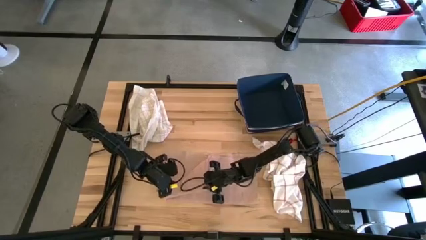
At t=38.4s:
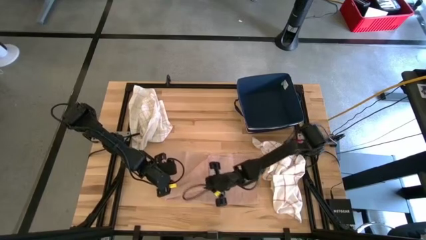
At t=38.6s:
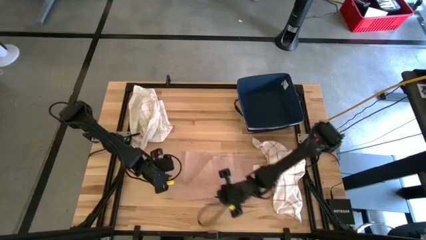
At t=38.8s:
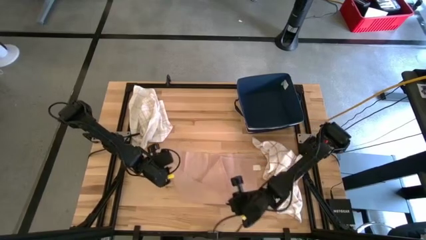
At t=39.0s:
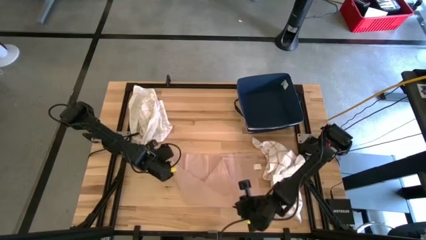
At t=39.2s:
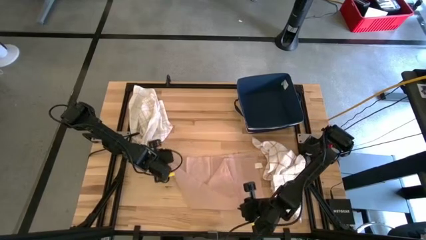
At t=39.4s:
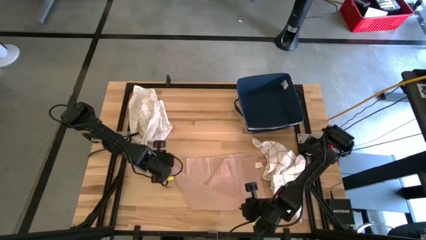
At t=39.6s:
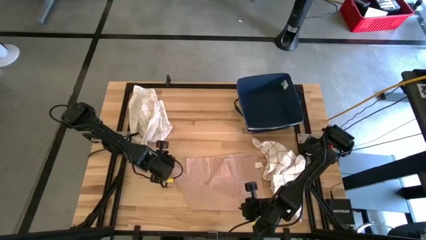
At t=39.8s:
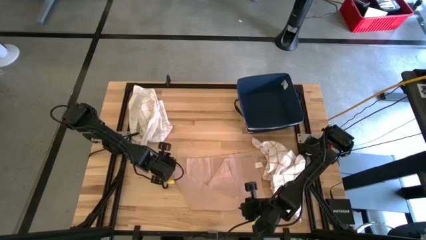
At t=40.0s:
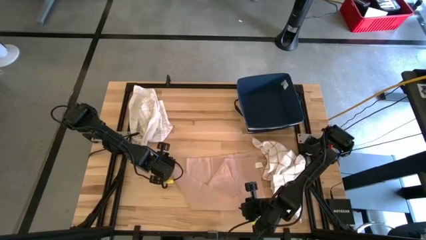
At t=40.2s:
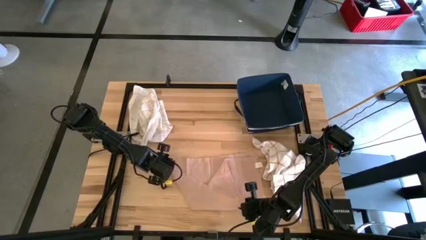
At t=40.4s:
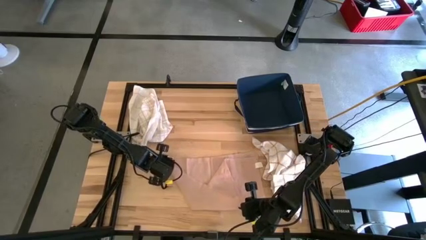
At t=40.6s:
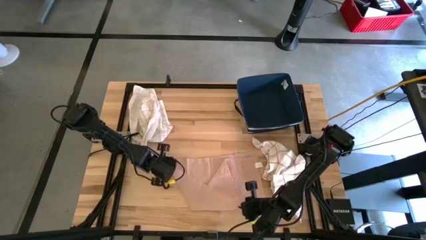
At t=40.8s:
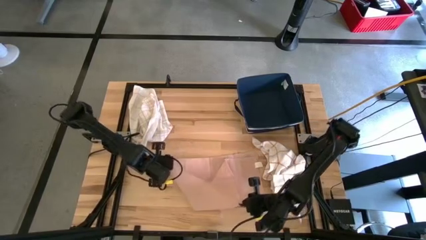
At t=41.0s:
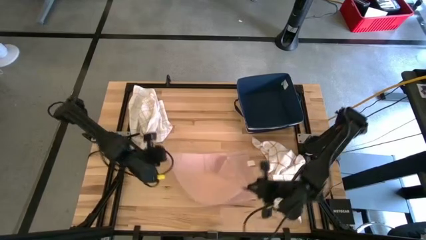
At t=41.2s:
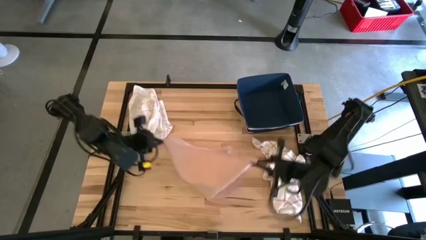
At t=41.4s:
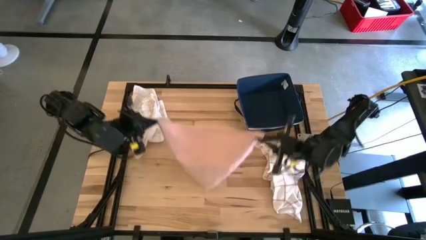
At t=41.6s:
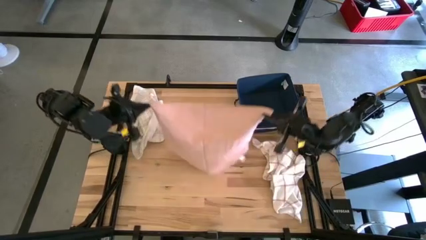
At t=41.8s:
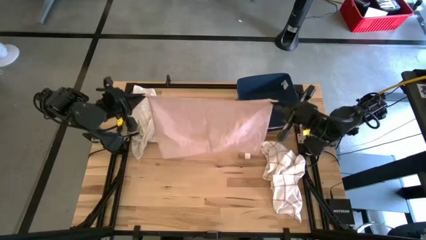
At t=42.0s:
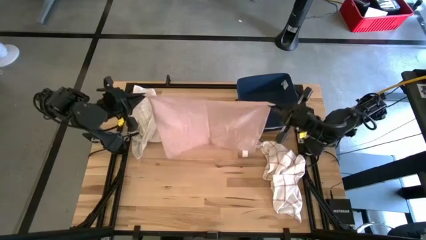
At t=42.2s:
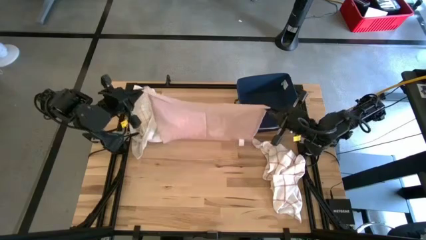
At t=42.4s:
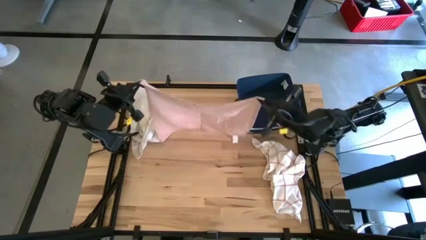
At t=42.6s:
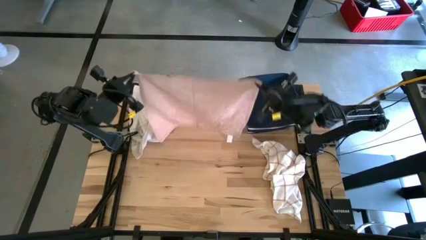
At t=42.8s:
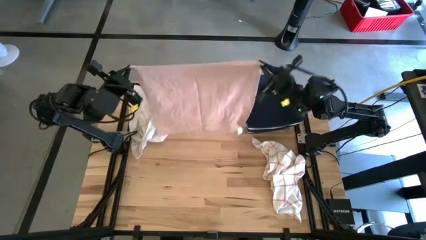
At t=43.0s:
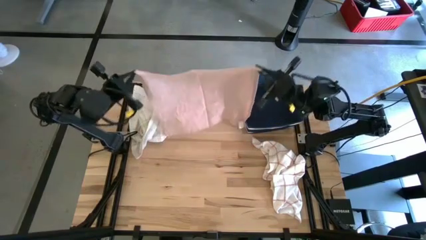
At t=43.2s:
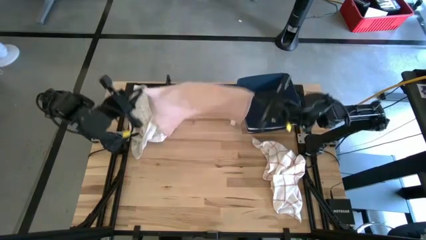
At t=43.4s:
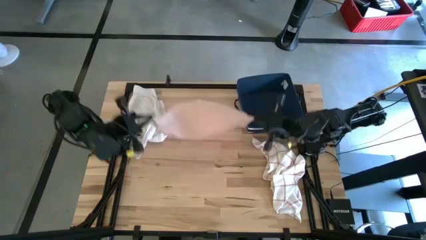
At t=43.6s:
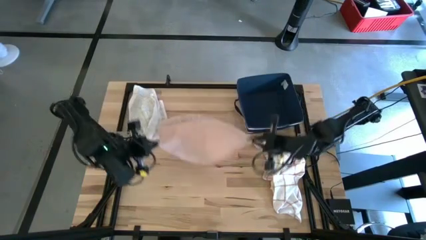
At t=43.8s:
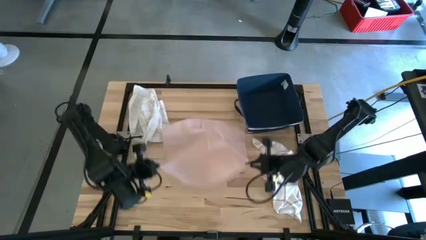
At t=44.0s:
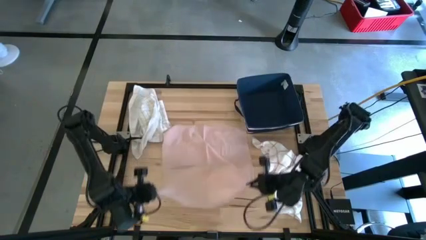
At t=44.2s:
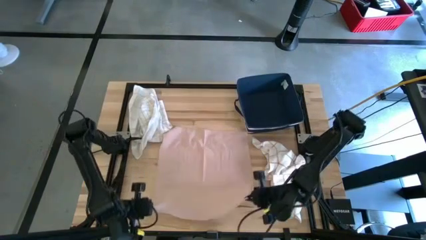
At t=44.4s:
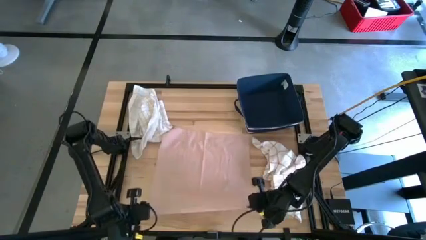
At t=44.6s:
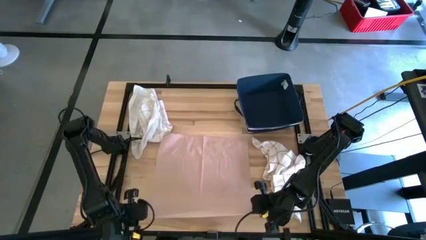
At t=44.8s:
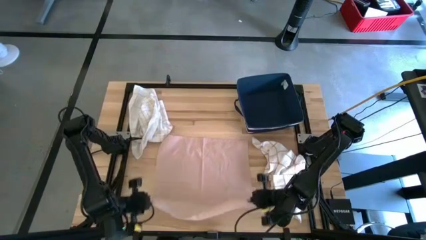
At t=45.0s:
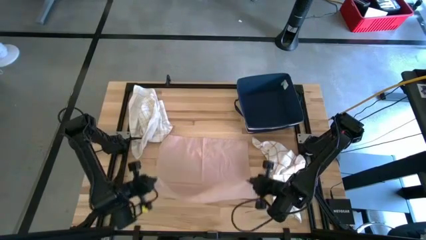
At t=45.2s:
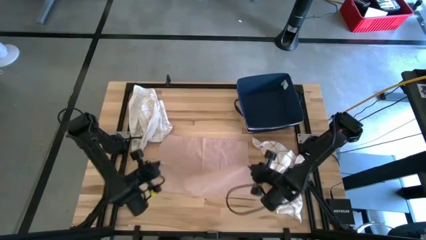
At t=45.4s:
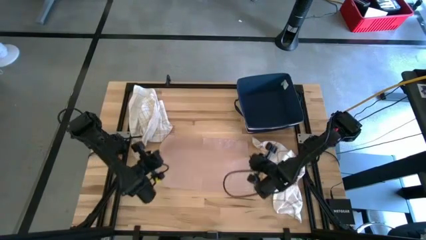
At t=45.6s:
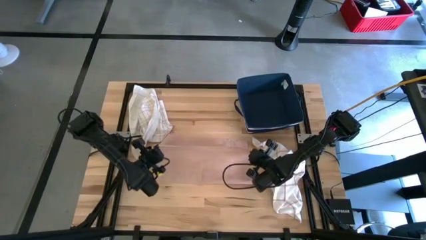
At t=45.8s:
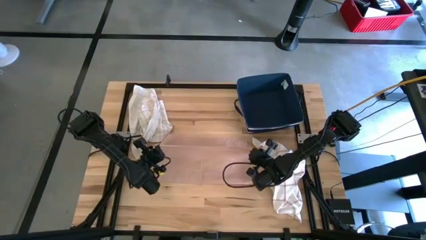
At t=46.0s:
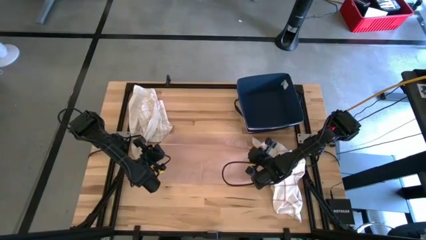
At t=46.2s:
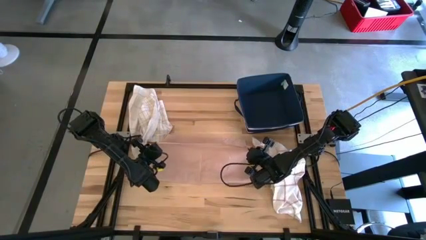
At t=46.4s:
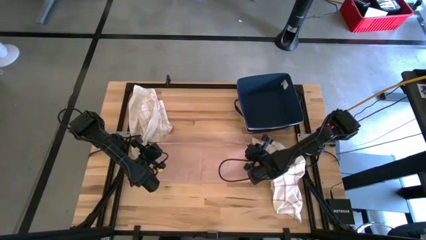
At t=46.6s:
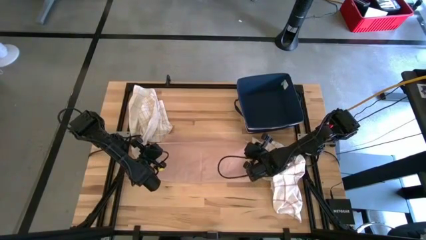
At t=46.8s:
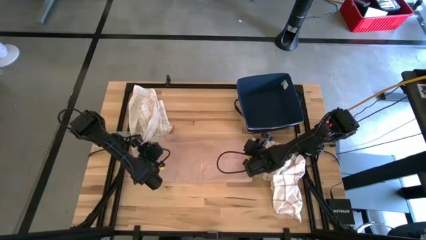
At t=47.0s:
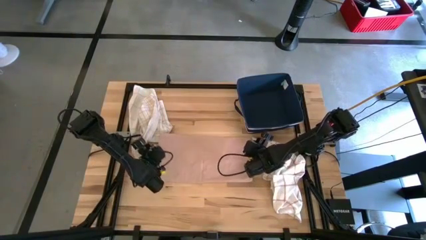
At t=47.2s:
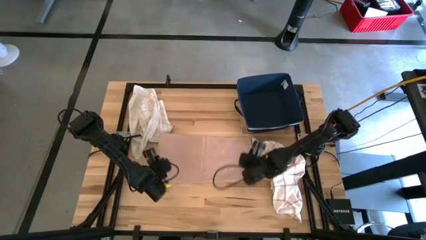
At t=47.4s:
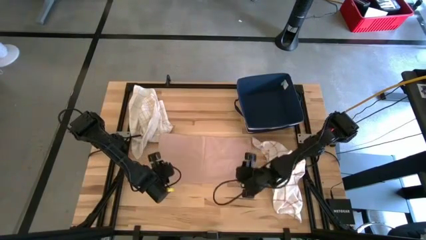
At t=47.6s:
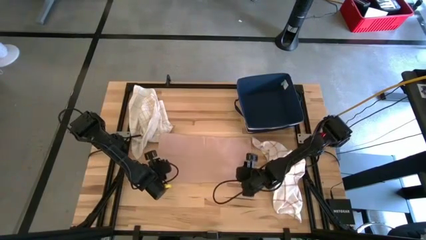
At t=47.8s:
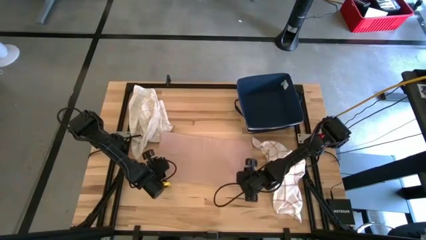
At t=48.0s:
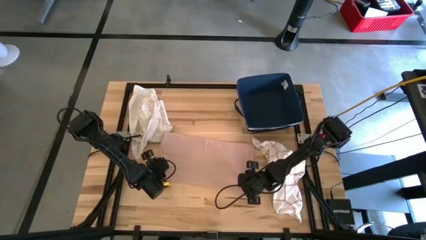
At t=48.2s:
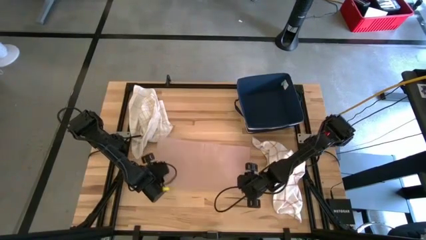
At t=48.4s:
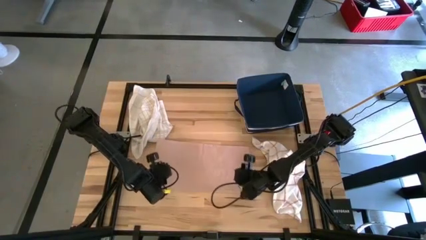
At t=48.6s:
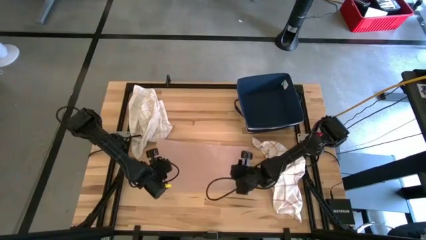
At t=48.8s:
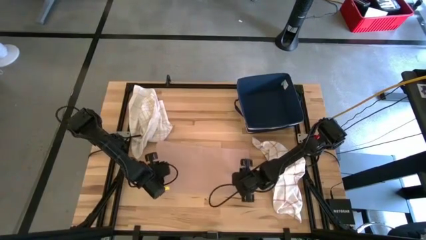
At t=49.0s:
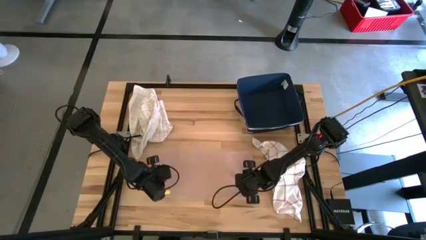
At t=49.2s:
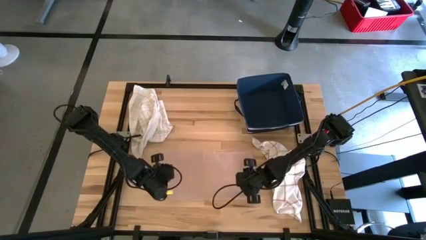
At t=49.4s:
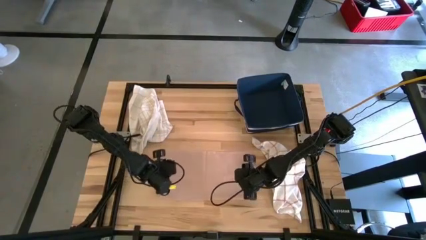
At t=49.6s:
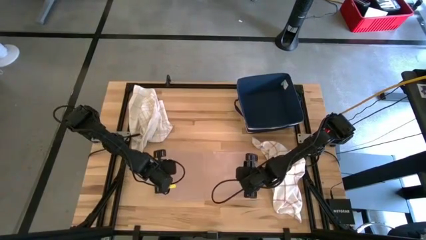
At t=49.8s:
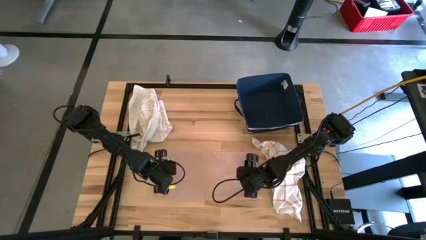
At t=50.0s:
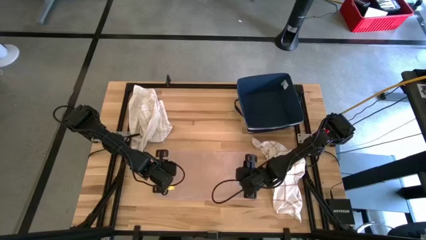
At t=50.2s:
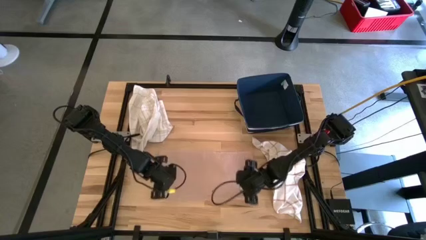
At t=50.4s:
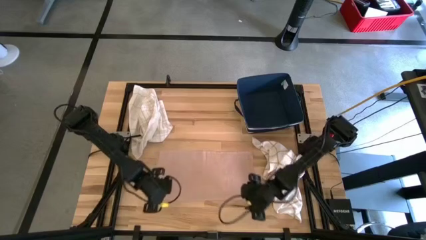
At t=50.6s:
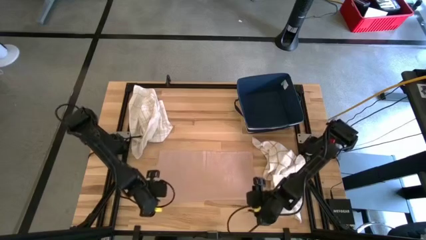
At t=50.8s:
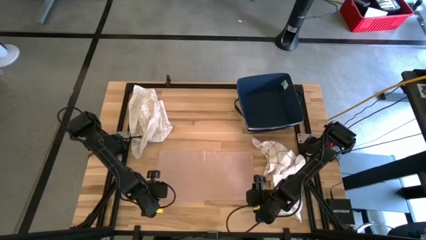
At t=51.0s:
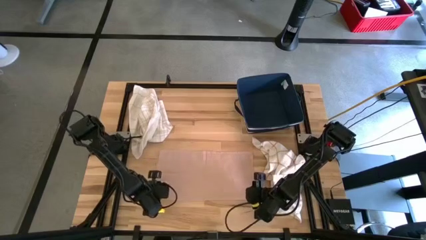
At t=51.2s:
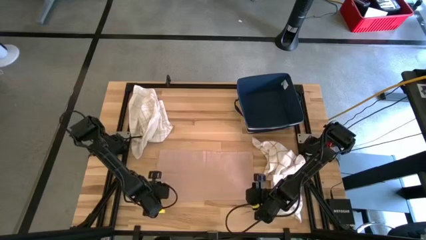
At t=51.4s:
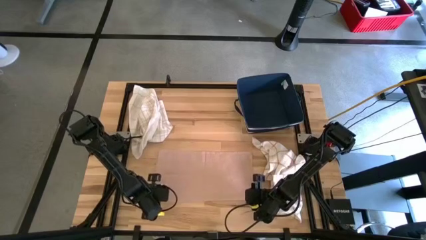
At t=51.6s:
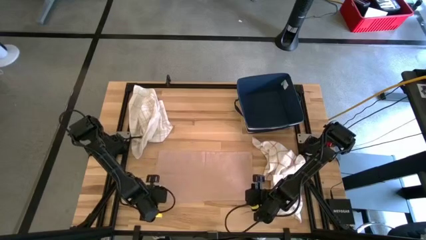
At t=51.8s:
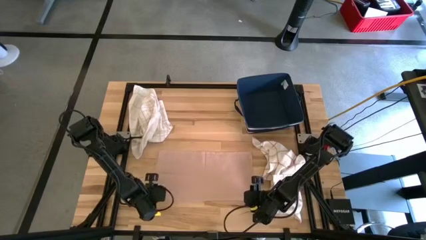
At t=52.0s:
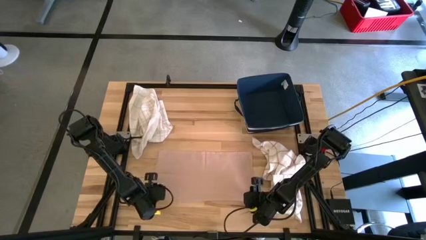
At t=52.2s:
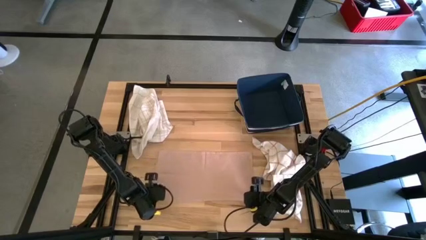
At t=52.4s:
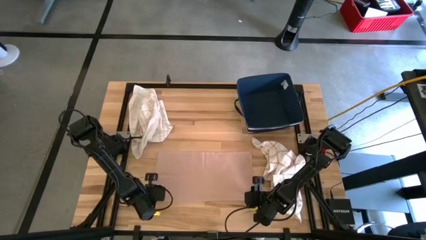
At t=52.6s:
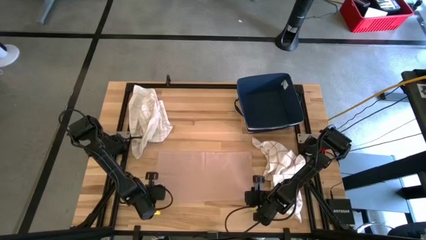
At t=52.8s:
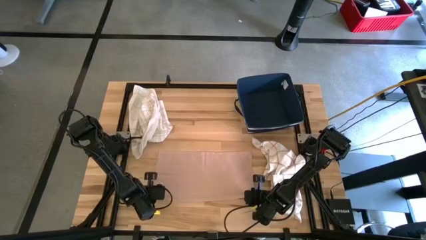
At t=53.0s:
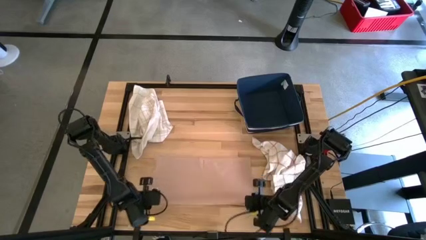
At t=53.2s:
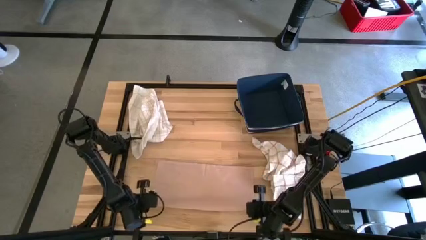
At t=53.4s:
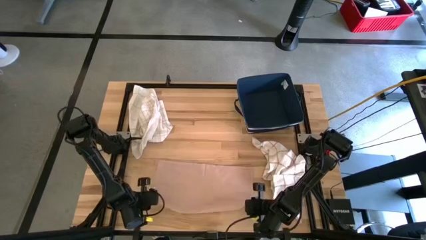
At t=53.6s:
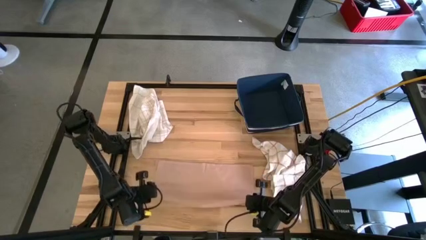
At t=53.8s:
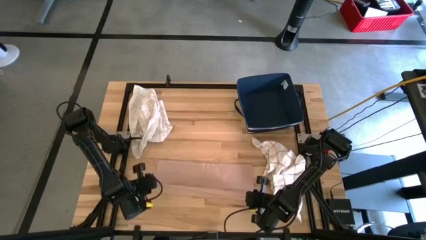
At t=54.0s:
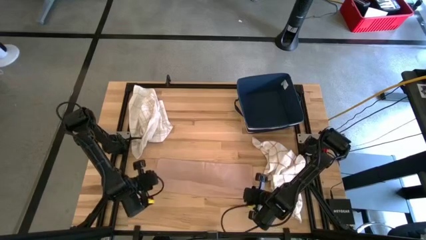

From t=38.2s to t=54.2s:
Task: Fold towel
Fold the pink towel
